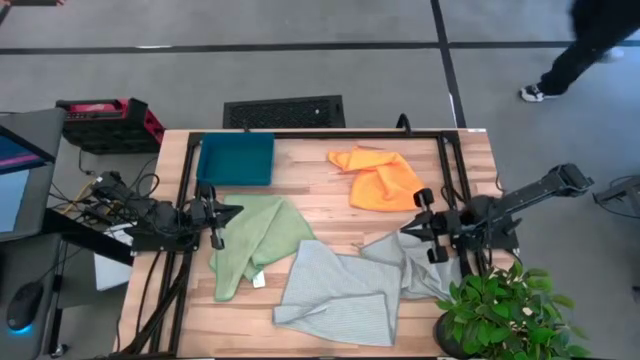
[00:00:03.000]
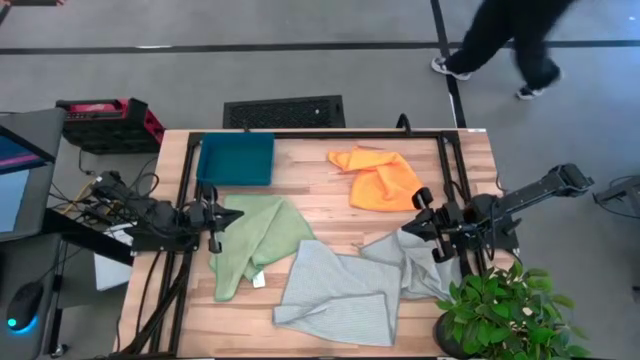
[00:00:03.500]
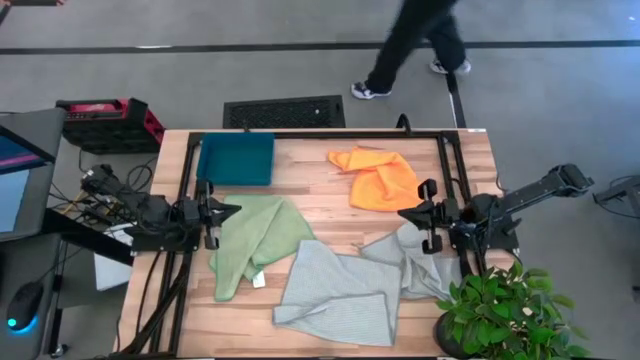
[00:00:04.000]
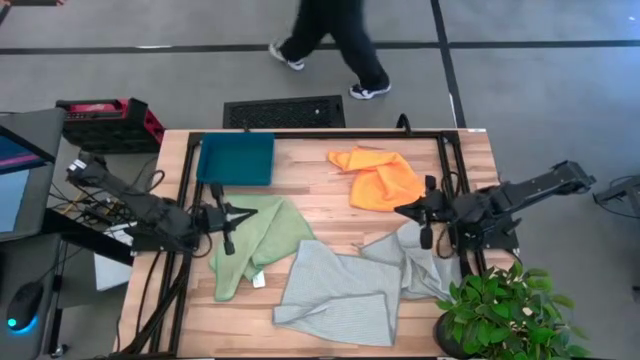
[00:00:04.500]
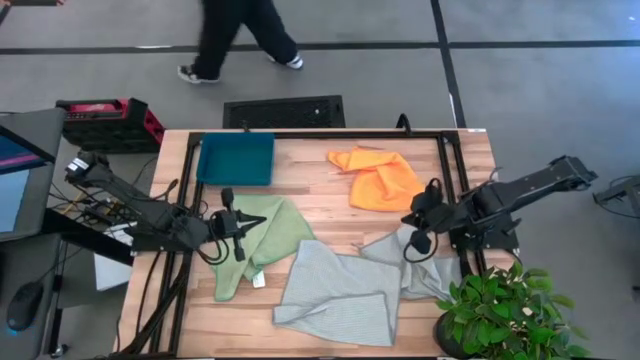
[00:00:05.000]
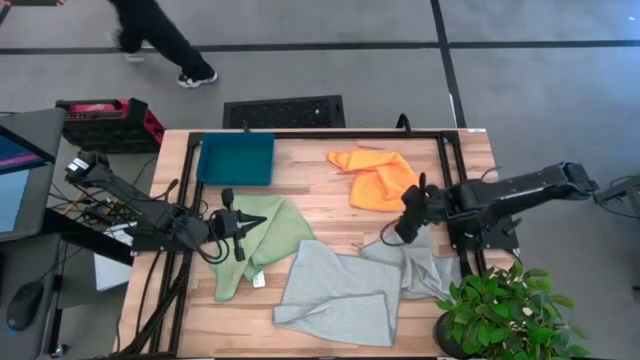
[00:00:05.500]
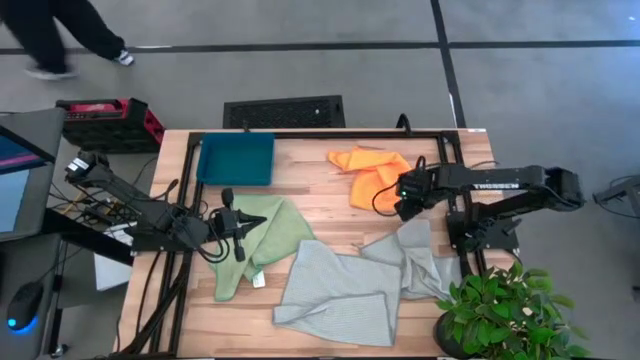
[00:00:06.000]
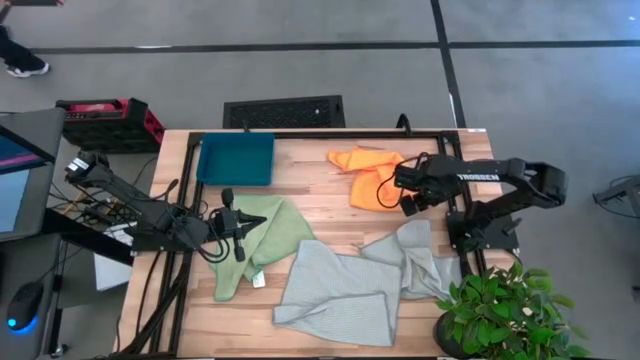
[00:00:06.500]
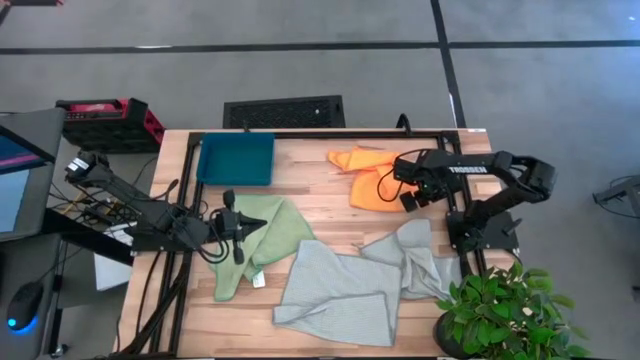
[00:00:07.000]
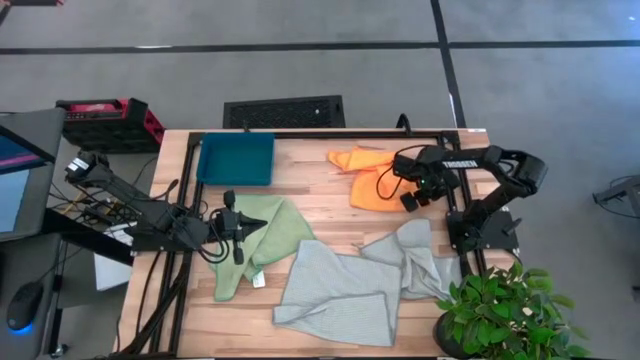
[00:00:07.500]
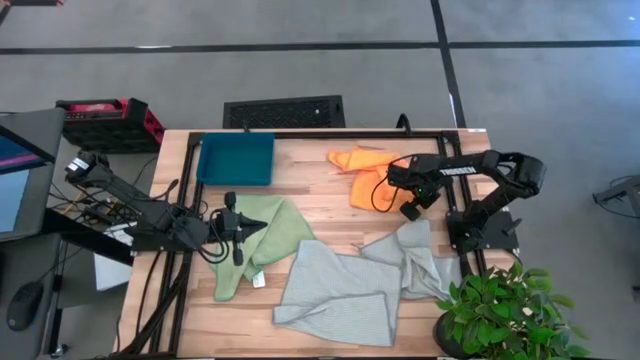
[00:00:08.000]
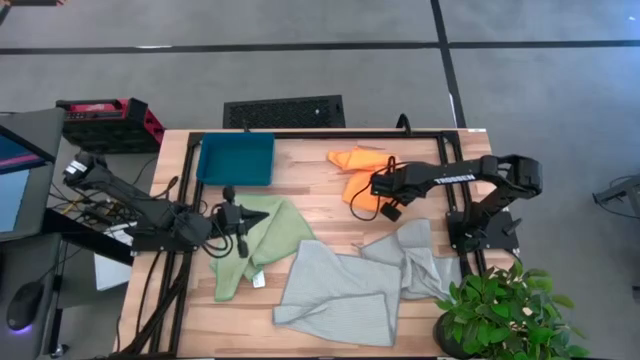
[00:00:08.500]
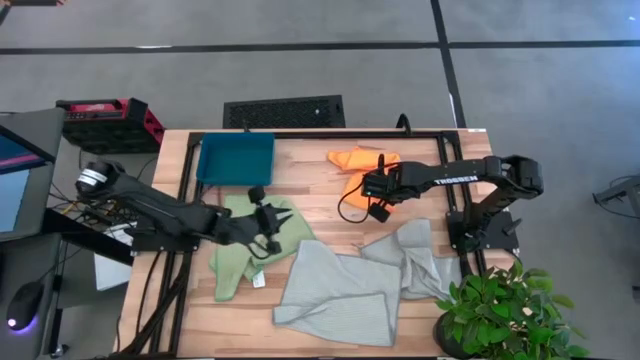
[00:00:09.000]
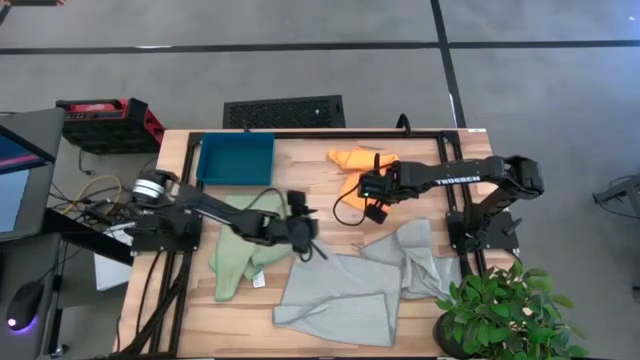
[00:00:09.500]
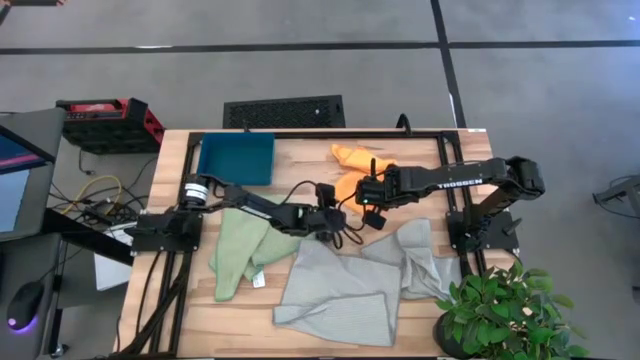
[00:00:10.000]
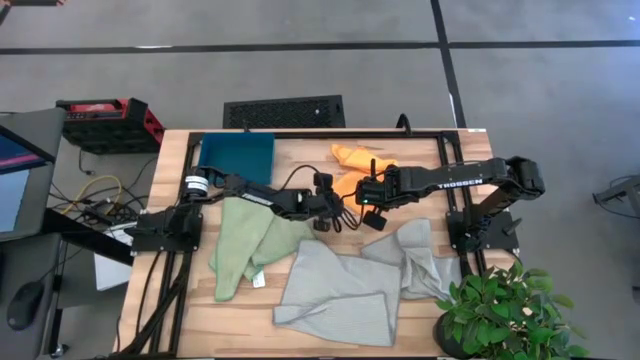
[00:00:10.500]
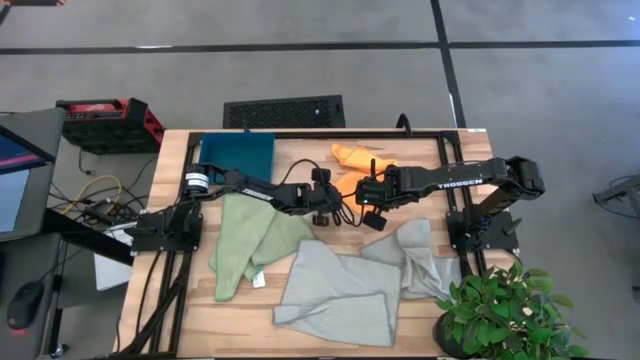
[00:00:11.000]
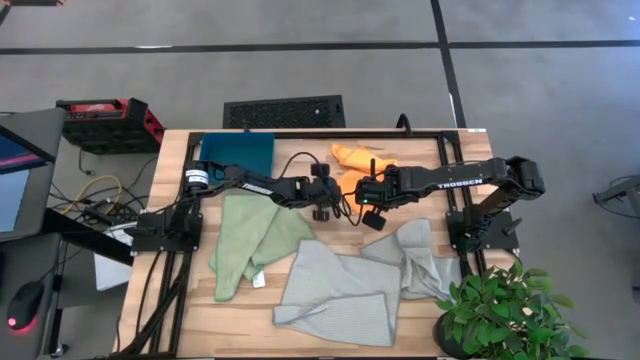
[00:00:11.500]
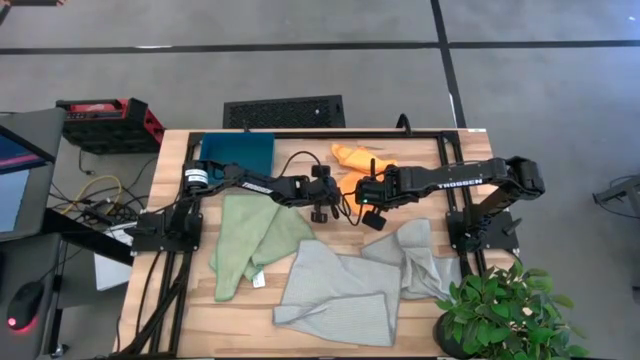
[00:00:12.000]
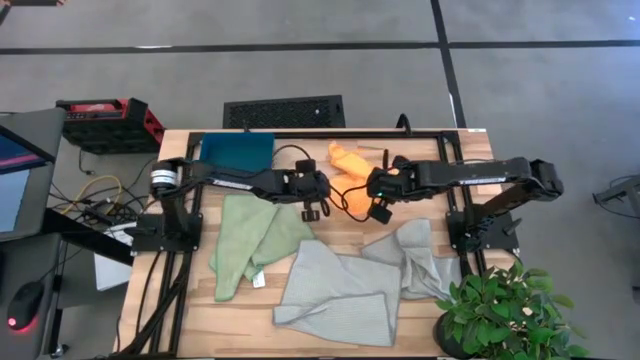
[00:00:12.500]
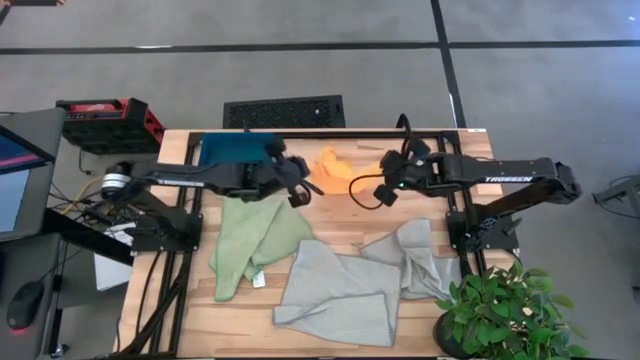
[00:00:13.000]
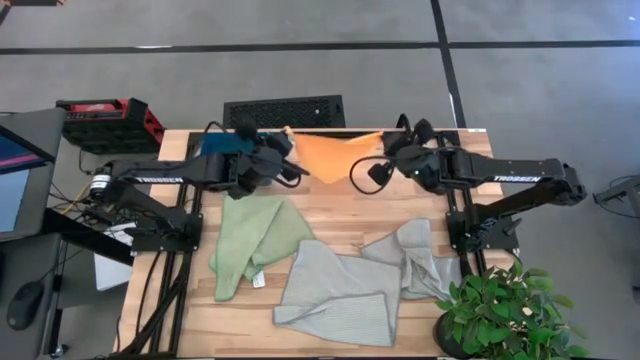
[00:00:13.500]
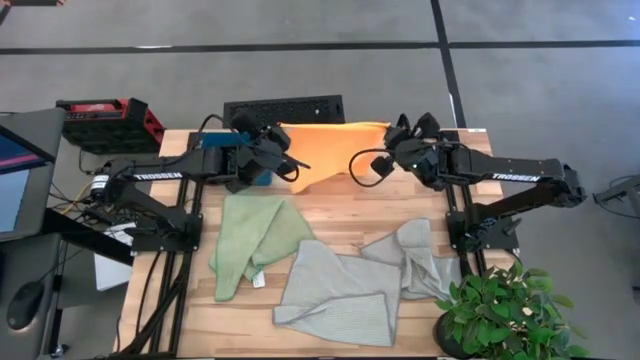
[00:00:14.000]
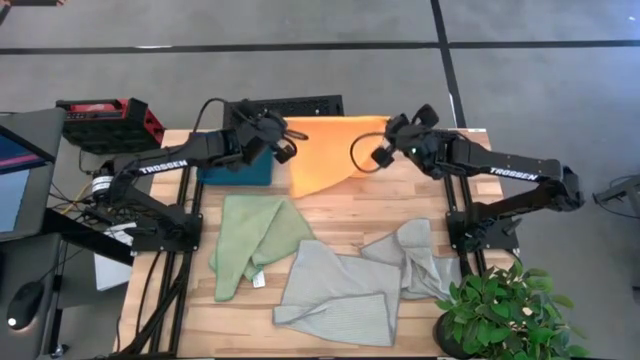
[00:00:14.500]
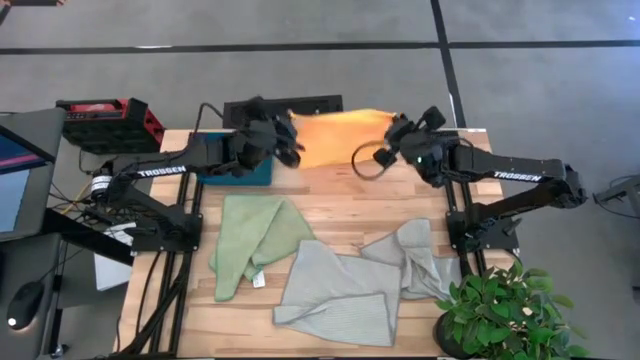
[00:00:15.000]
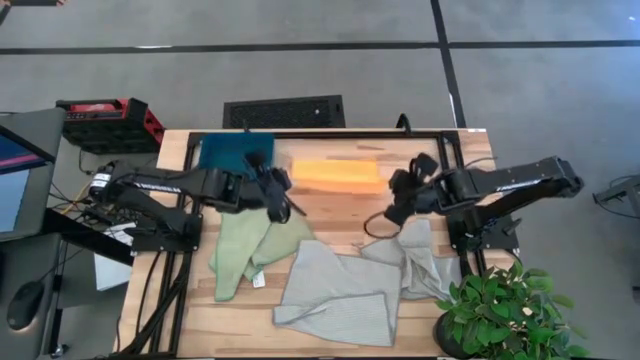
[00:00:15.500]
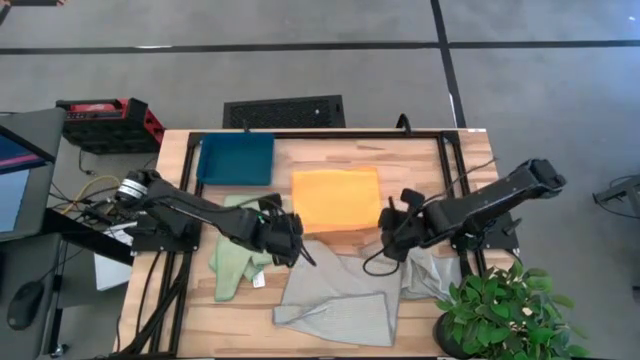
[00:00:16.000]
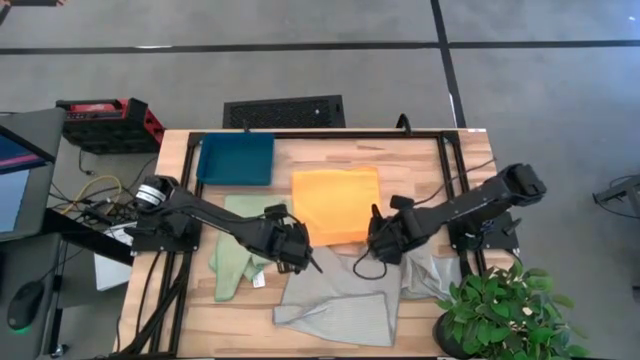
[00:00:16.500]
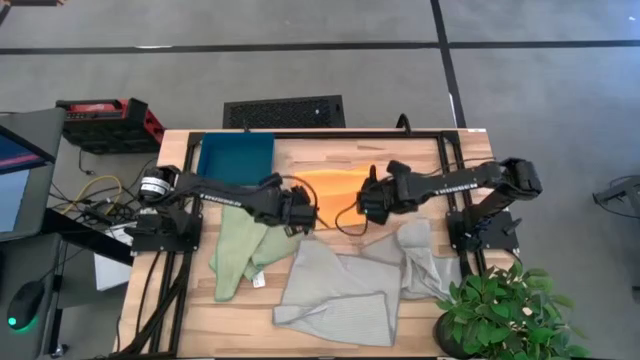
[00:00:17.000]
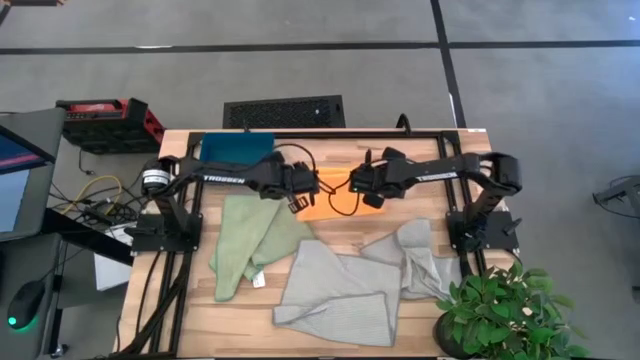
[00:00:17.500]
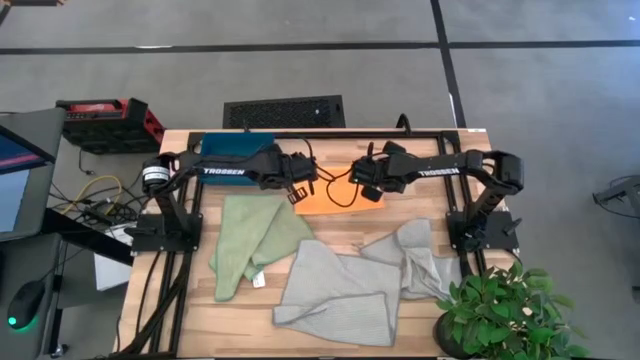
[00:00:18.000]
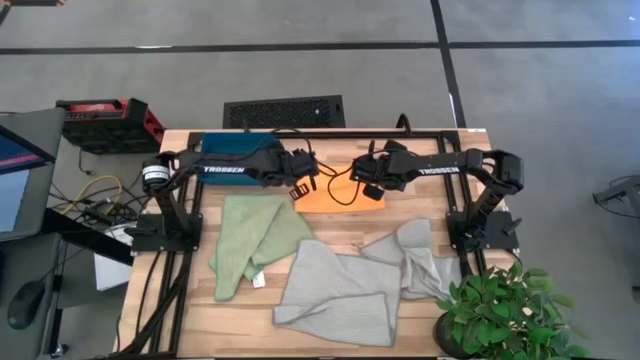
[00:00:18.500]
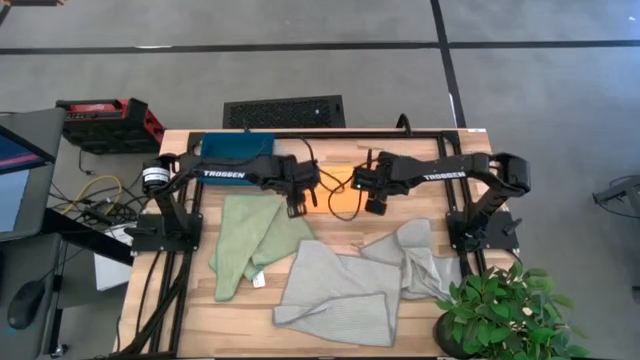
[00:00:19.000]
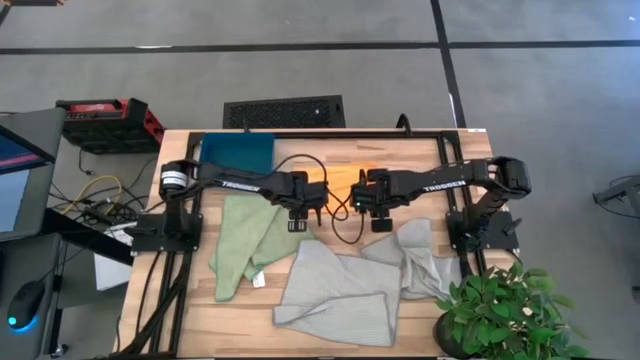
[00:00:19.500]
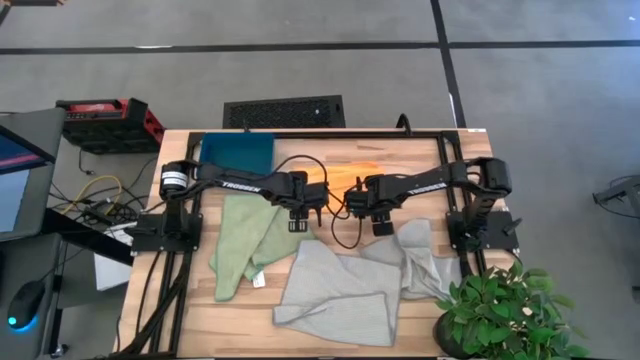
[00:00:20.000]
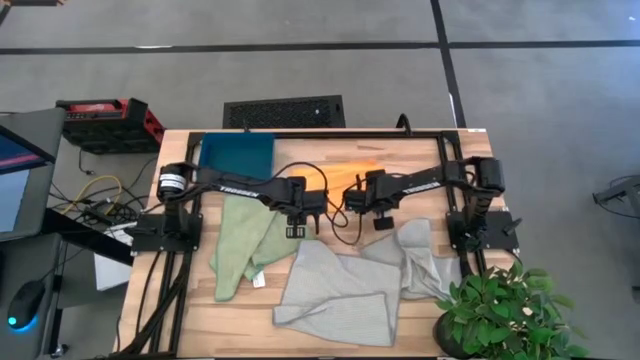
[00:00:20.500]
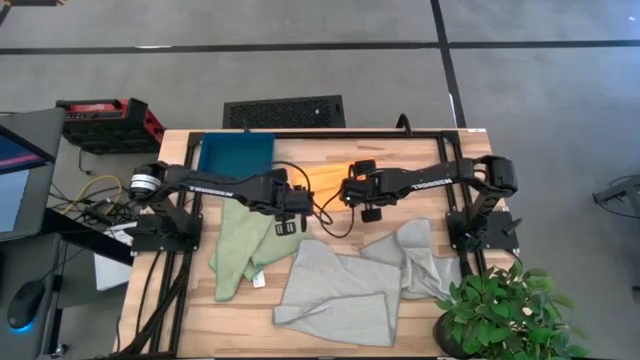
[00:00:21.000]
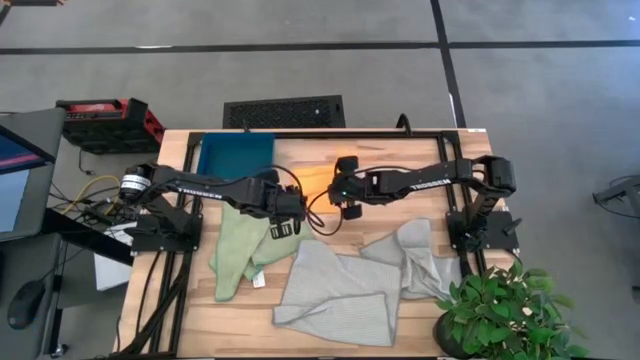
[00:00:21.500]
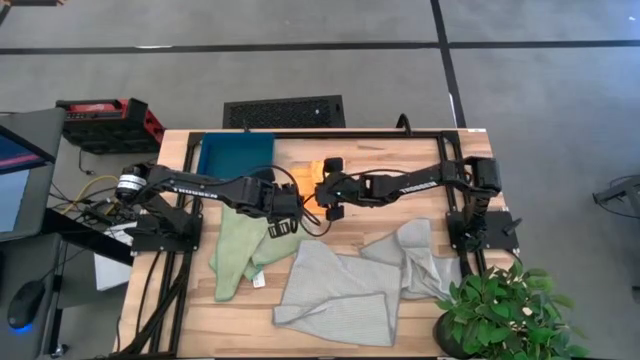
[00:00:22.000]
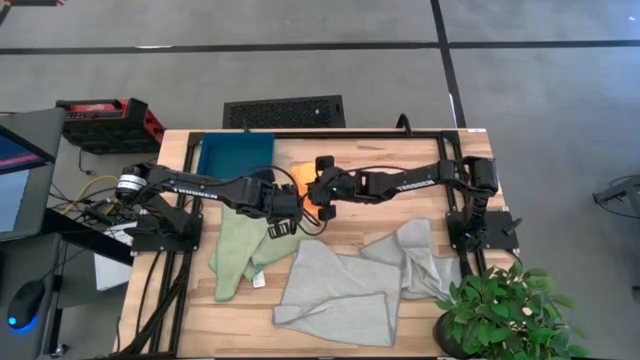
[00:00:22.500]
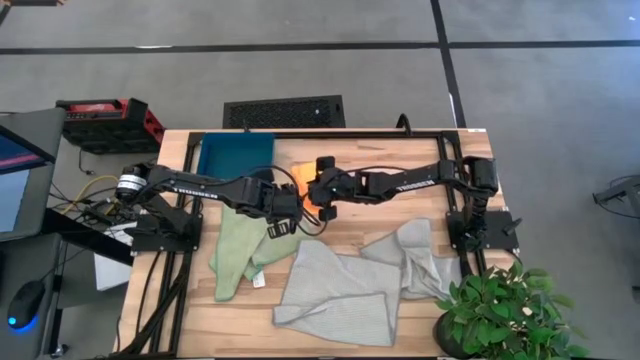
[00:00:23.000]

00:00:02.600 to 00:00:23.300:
Task: Fold microfiber towels
Fold the orange towel
